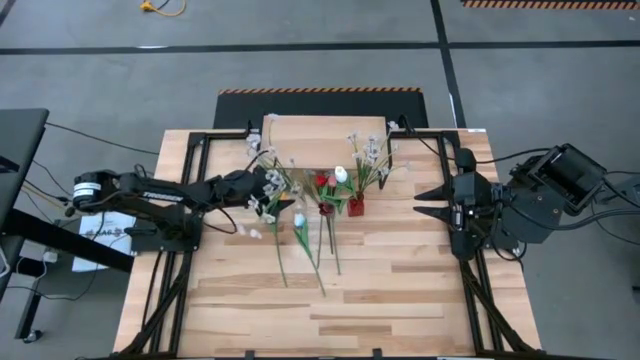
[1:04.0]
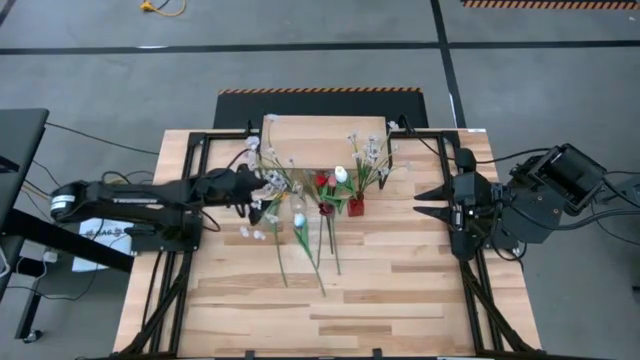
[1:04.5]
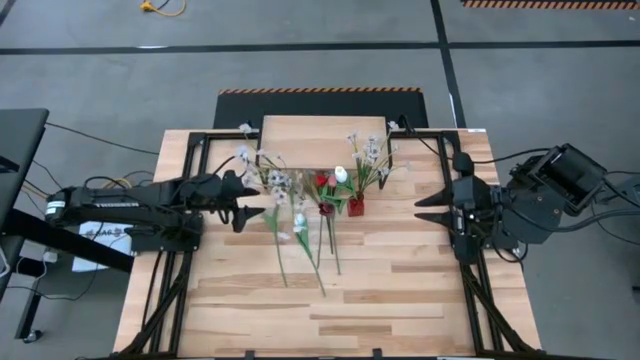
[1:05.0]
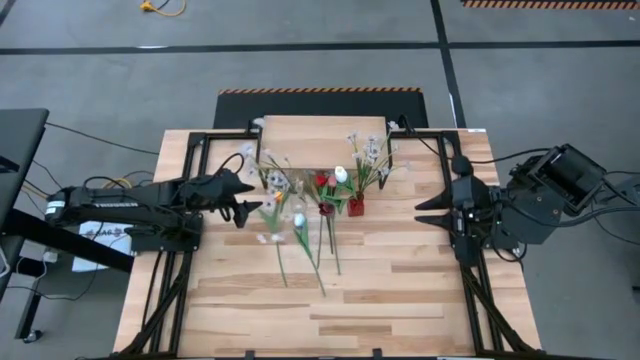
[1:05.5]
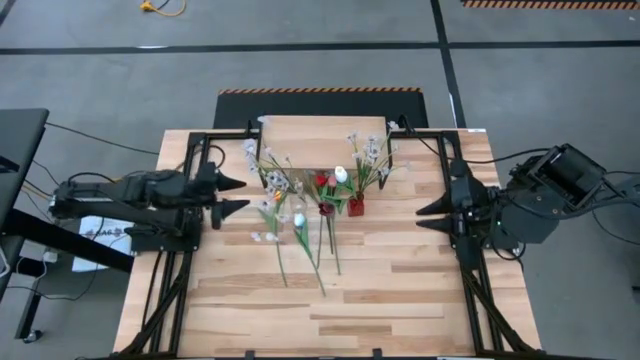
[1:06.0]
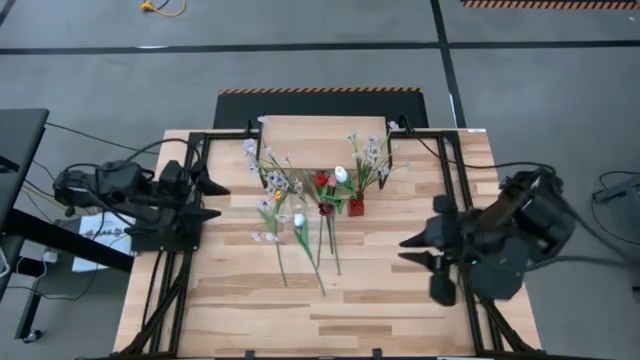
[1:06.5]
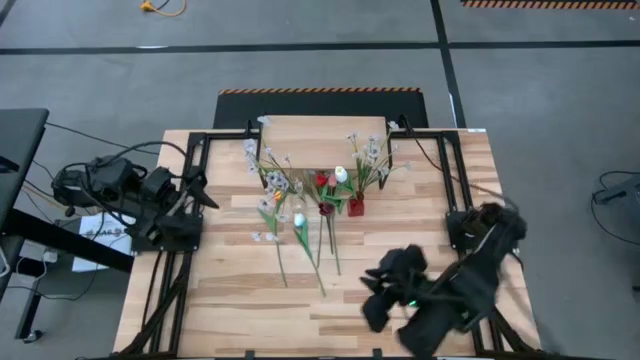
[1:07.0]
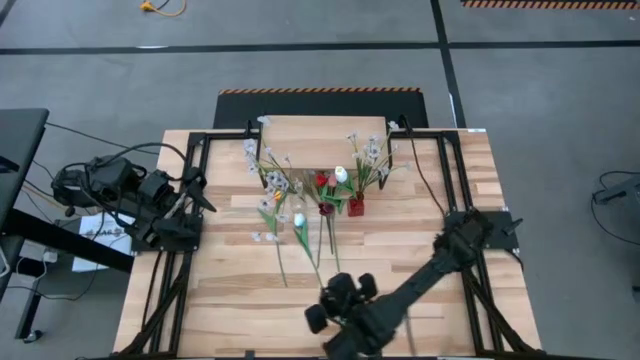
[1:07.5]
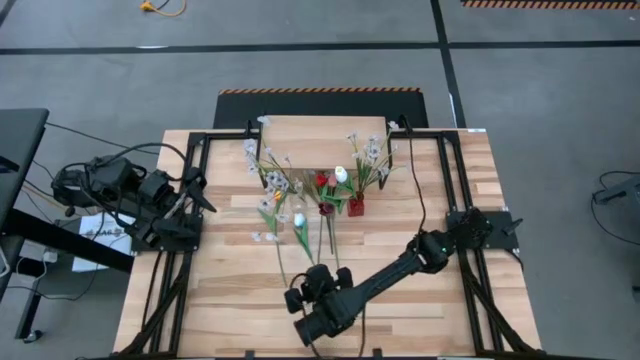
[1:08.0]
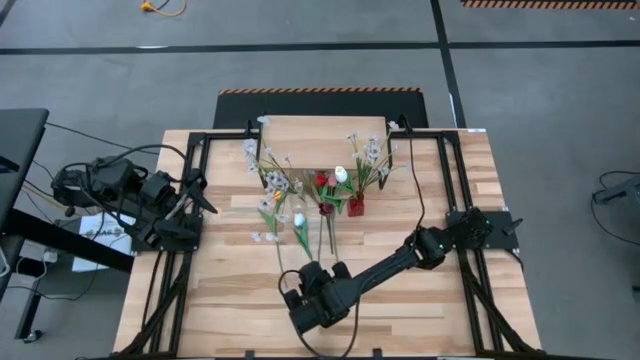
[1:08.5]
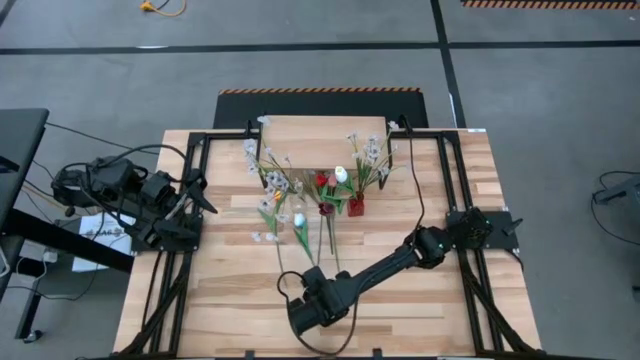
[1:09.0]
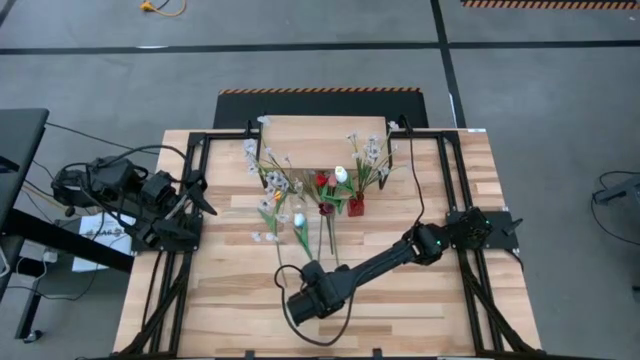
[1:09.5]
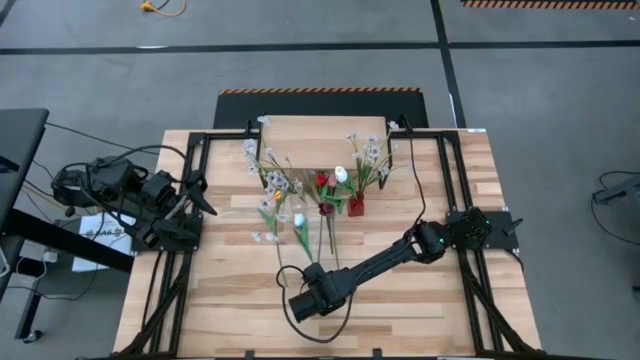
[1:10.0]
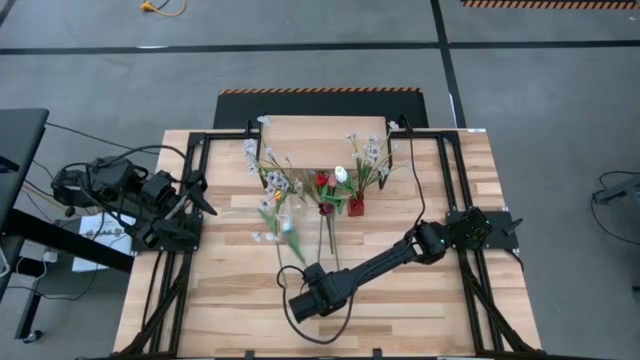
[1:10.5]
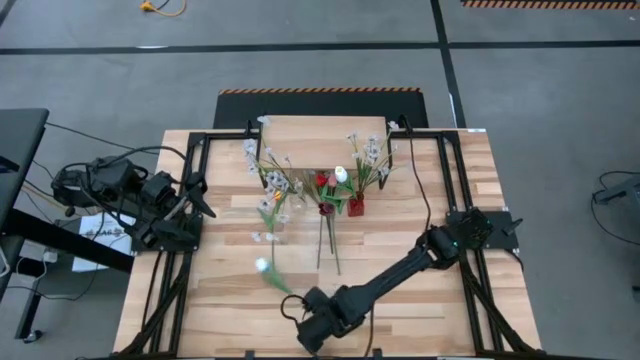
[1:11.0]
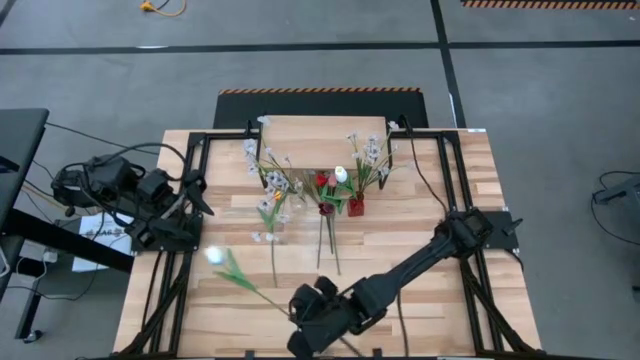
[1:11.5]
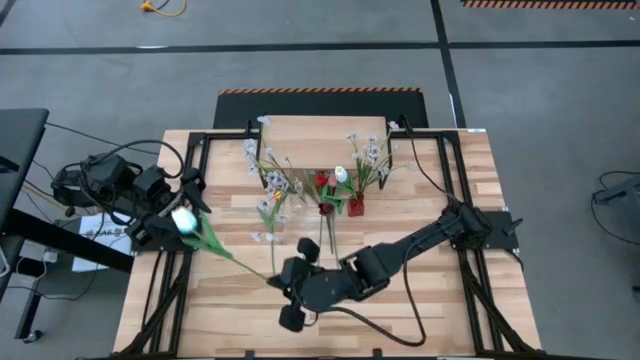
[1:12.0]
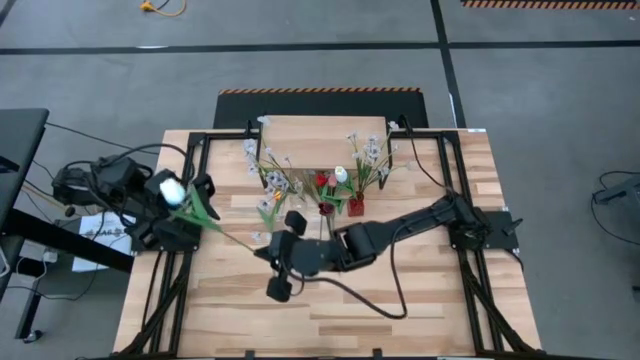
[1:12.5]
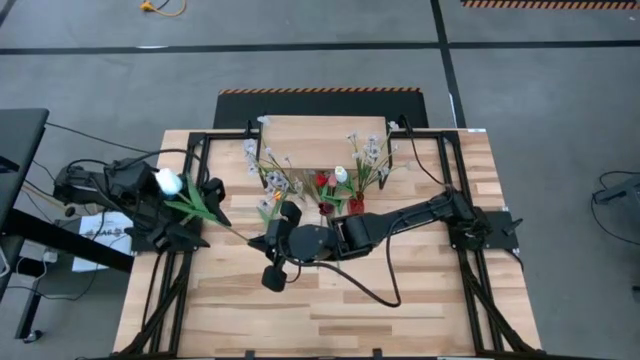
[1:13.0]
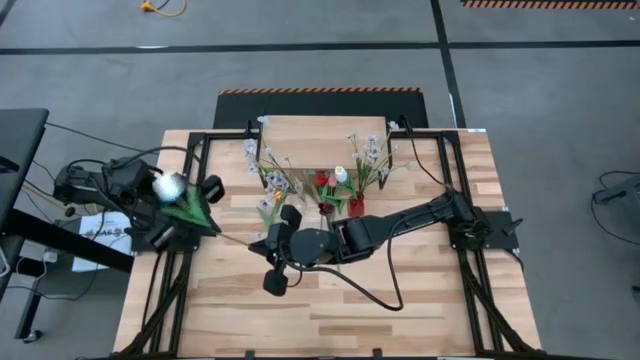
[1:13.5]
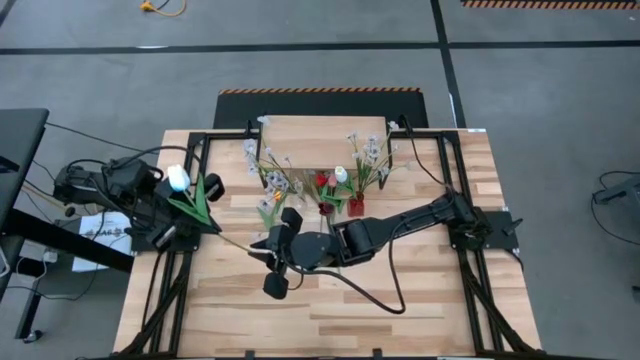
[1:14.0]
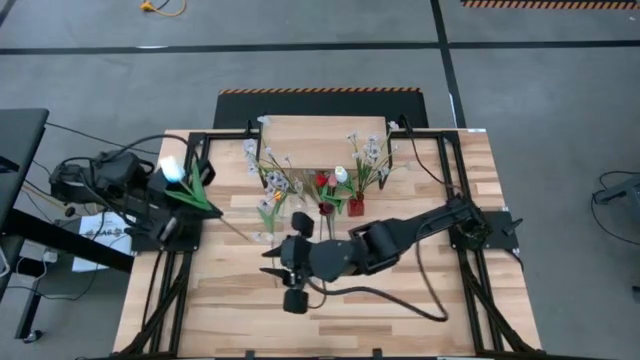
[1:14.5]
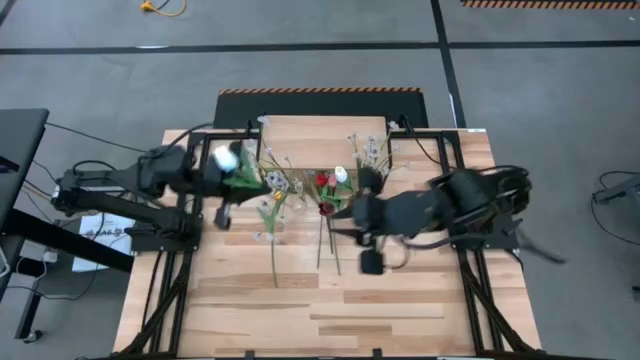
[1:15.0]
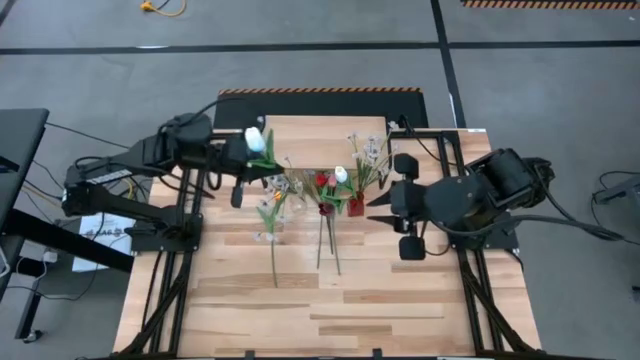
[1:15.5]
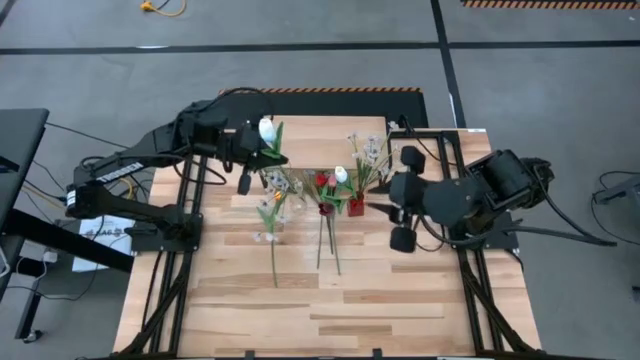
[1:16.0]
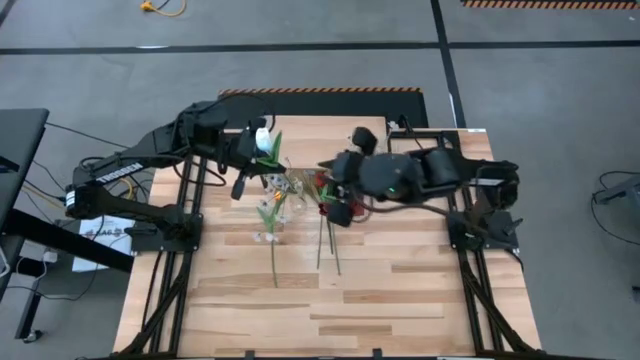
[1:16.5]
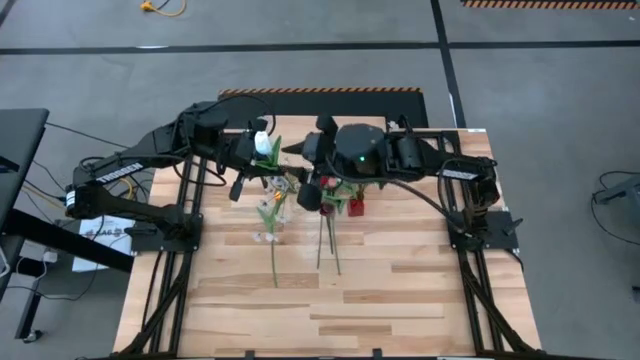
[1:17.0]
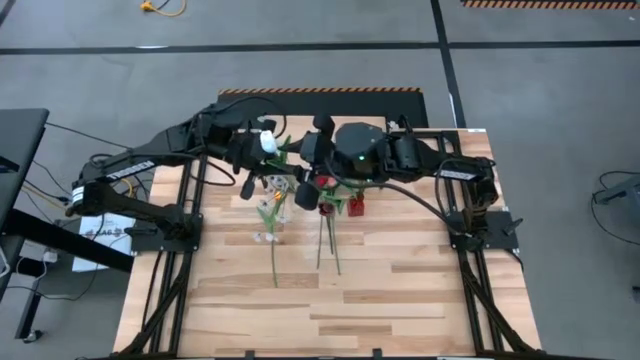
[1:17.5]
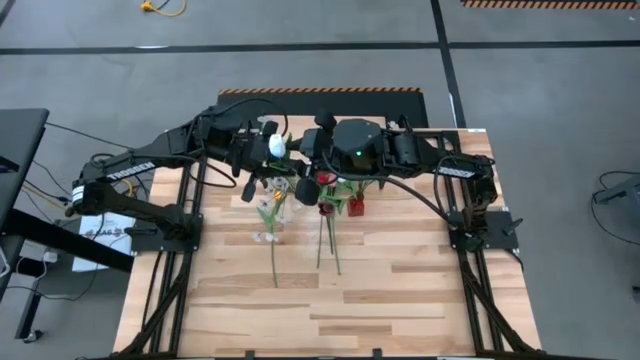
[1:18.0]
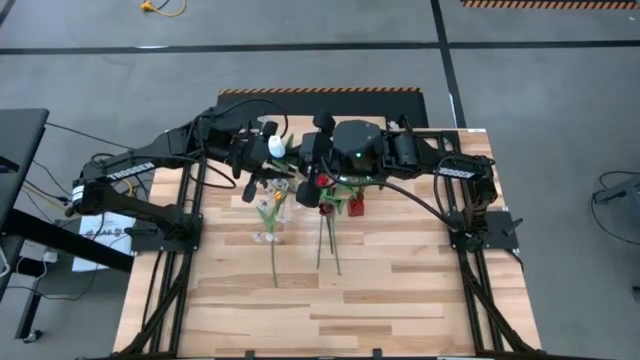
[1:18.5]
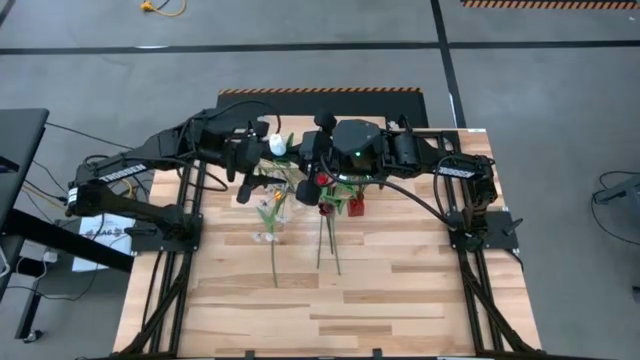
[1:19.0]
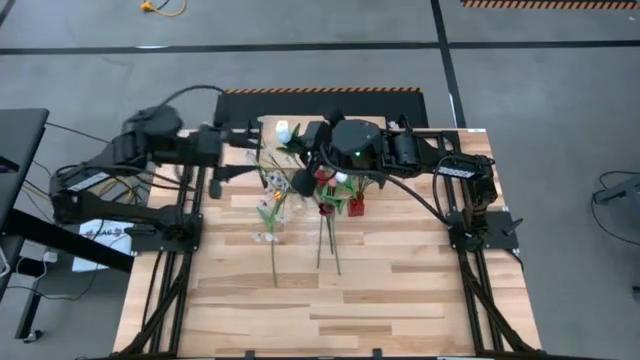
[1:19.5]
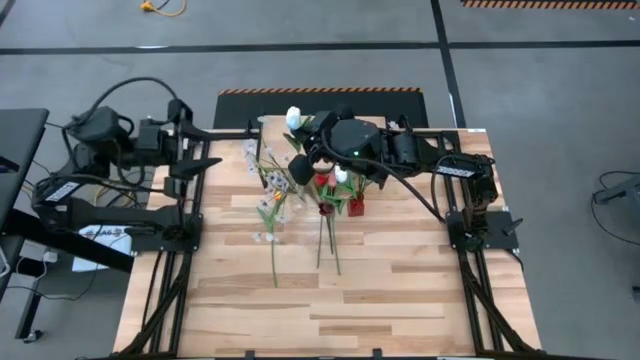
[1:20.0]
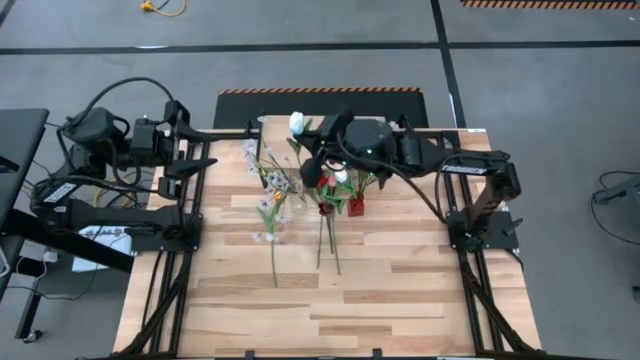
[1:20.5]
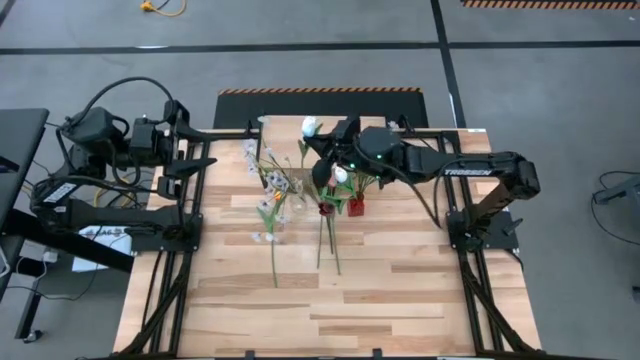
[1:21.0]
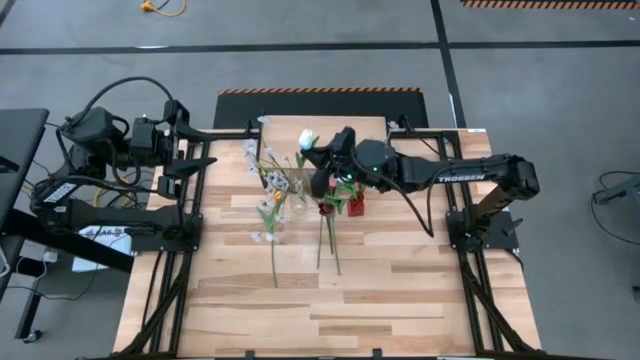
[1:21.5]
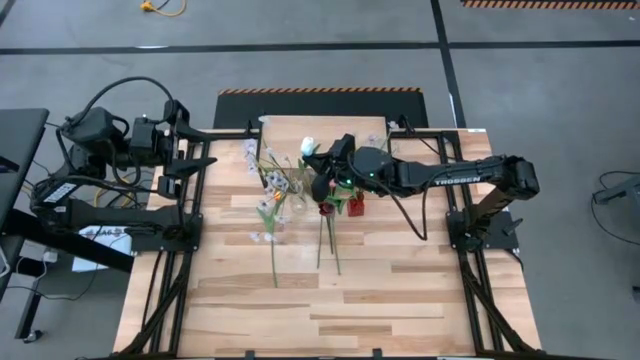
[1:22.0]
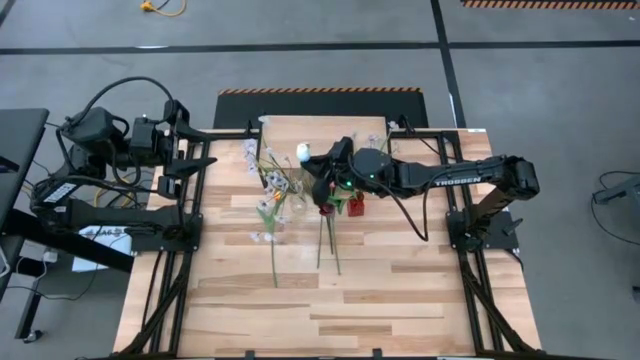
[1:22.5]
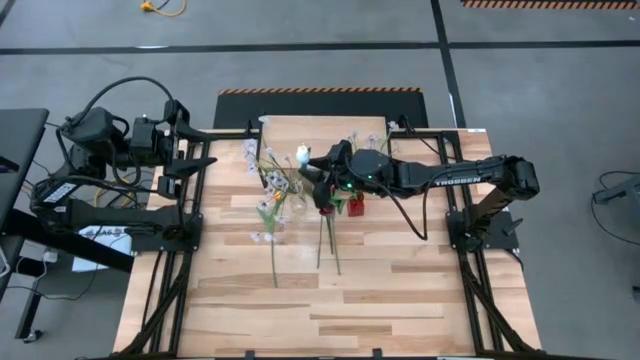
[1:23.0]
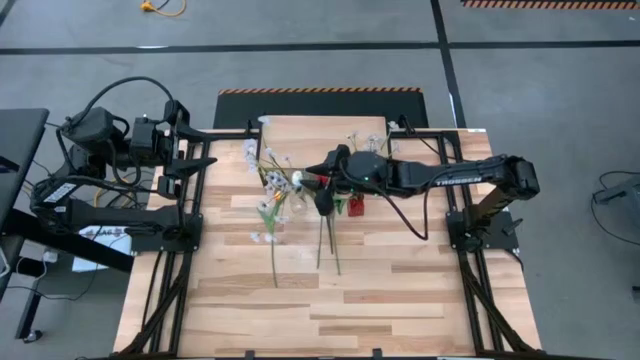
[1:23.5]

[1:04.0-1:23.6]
Task: Pick and place flowers into a vace then onto a shelf
Put the blue flower into the transparent vase
